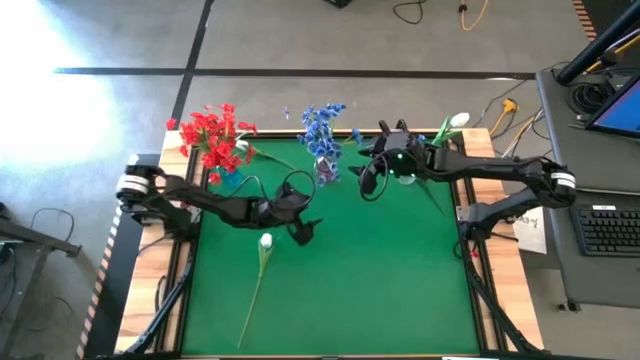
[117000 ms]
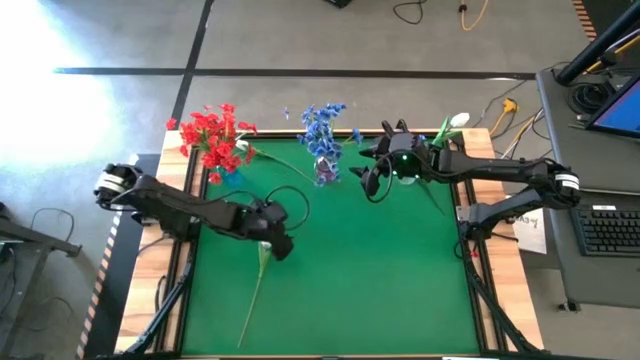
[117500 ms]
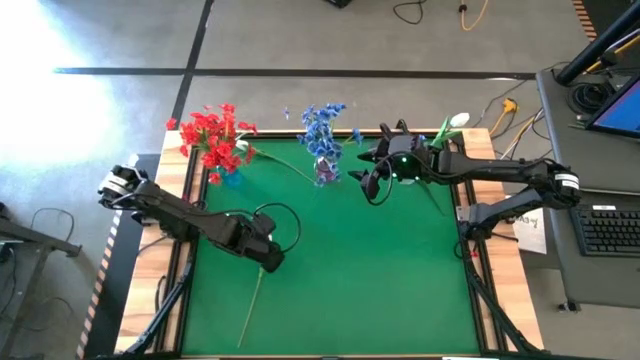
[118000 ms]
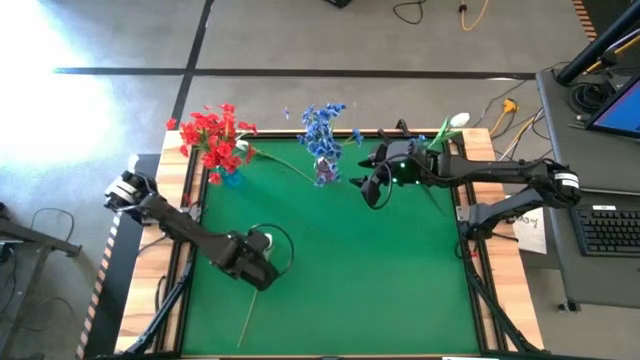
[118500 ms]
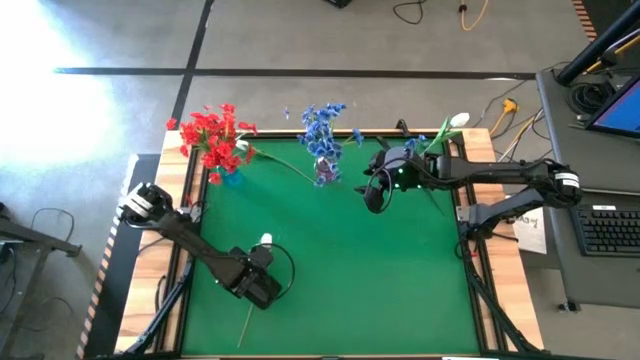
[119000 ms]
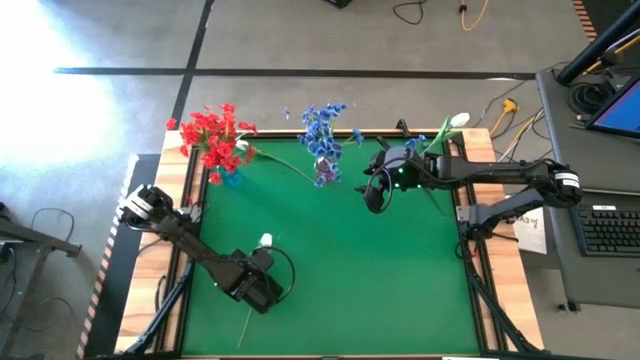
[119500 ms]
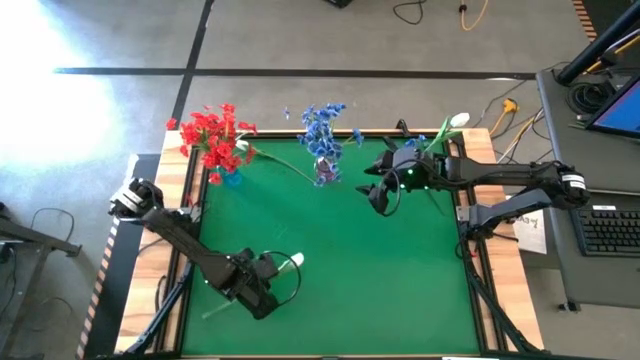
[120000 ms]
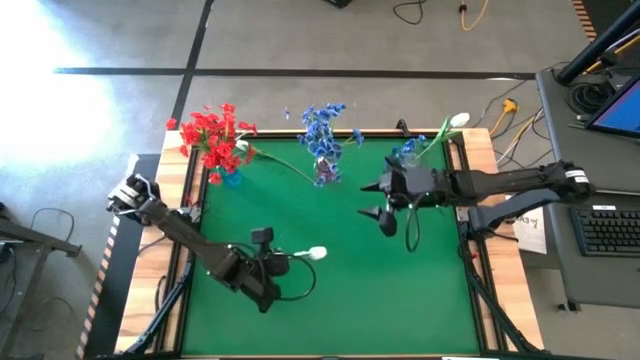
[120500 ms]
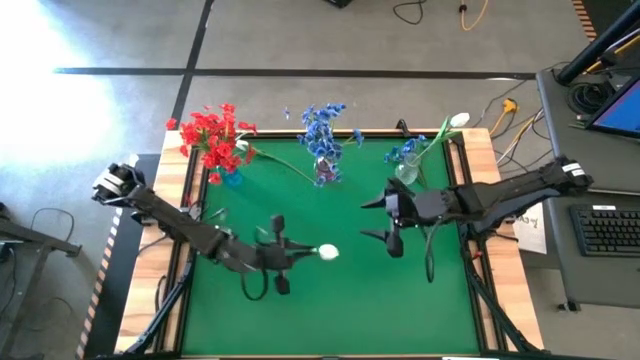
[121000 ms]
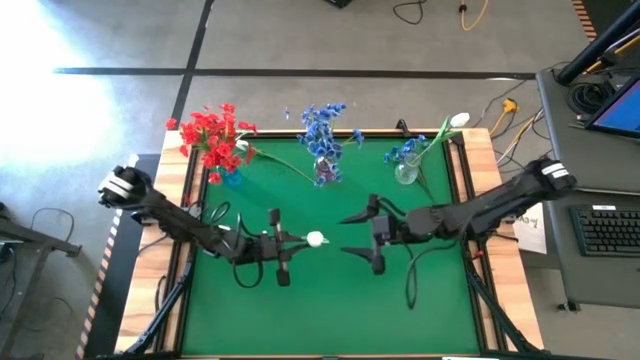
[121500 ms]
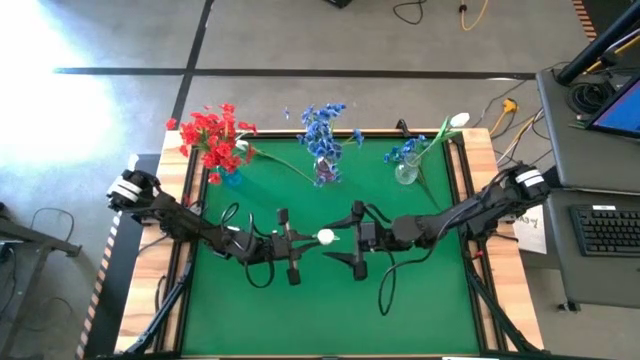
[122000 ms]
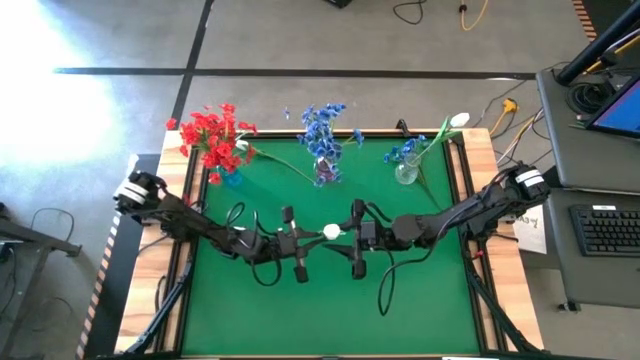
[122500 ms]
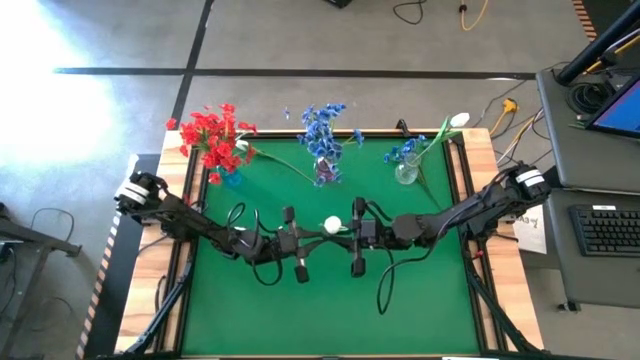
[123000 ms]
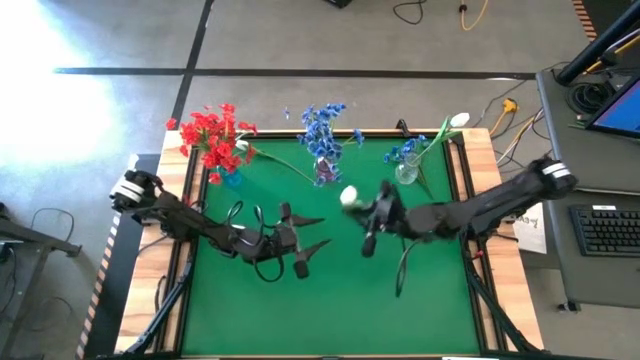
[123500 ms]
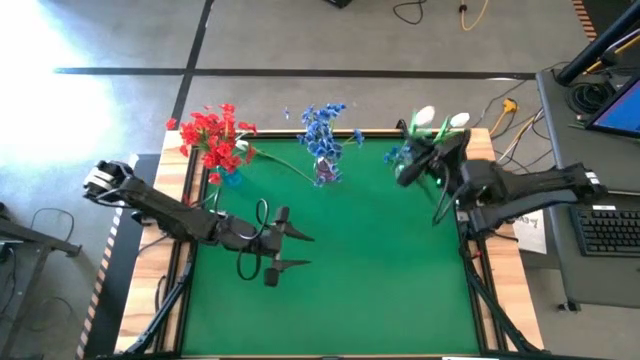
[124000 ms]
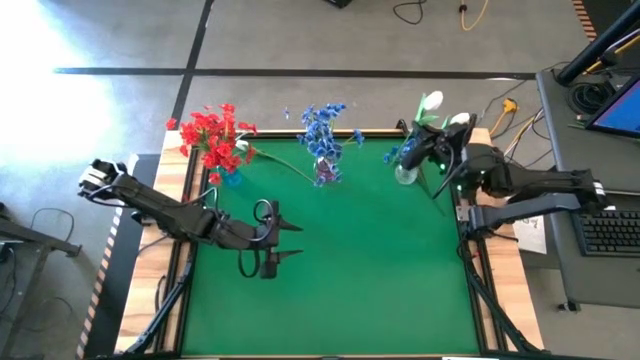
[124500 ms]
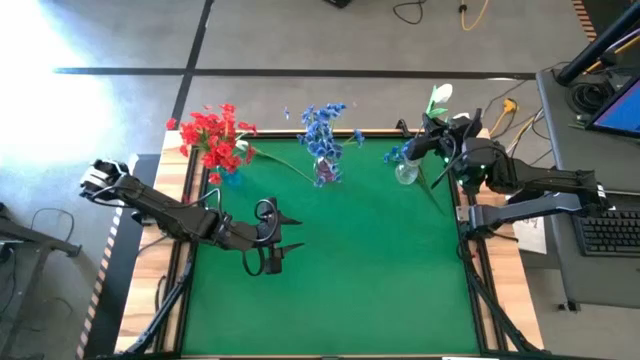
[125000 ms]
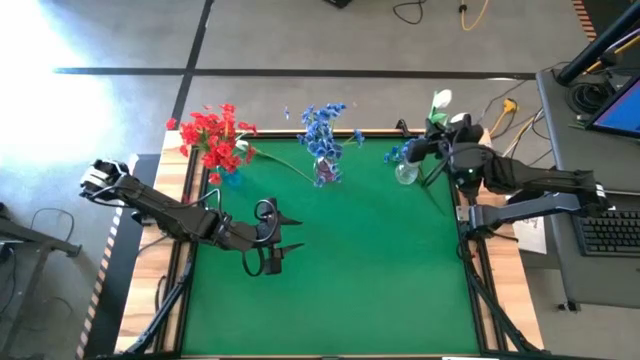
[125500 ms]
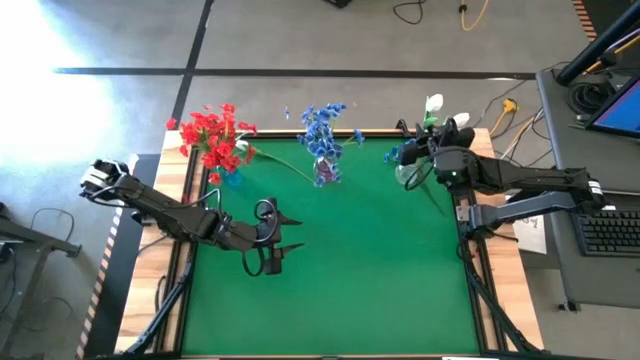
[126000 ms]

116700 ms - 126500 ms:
Task: Sort flowers into vase by color
Put the bottom white flower into the transparent vase

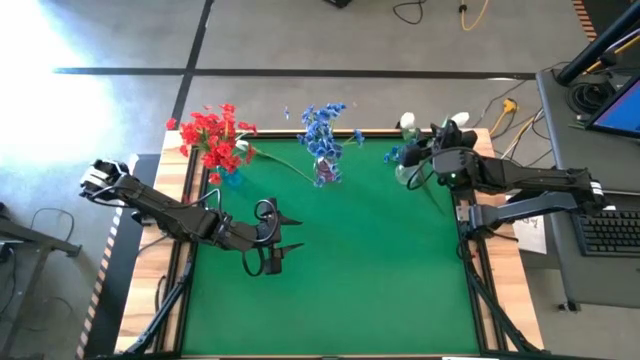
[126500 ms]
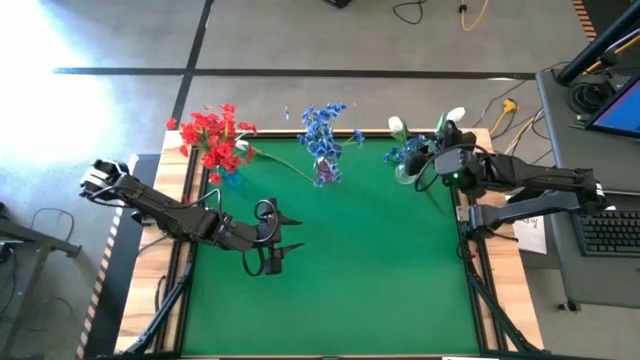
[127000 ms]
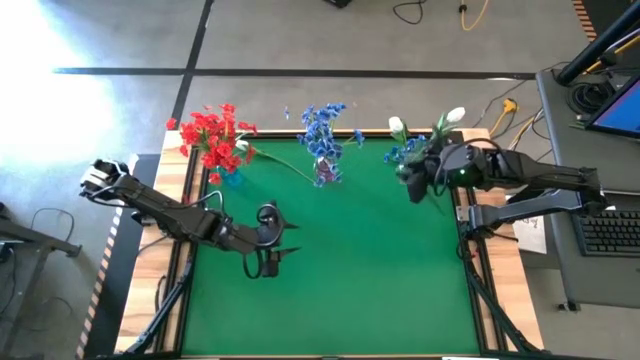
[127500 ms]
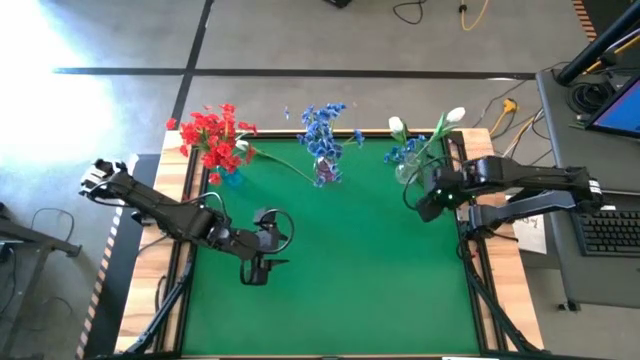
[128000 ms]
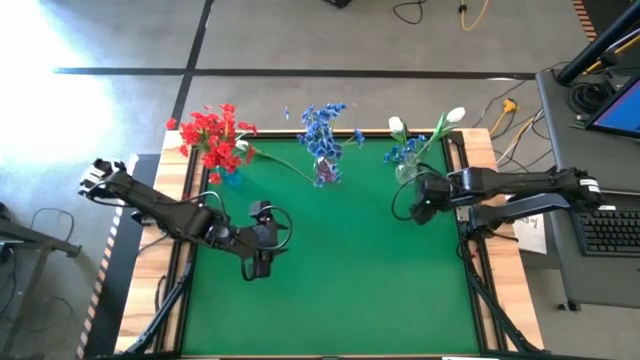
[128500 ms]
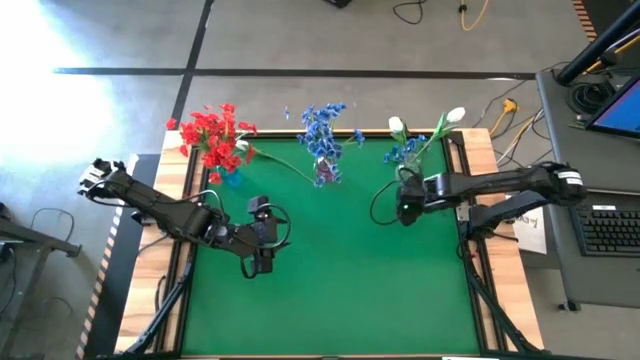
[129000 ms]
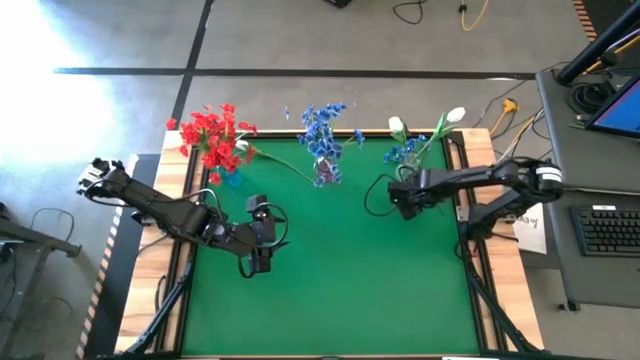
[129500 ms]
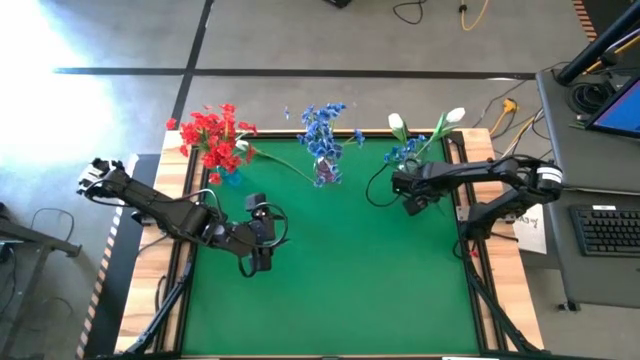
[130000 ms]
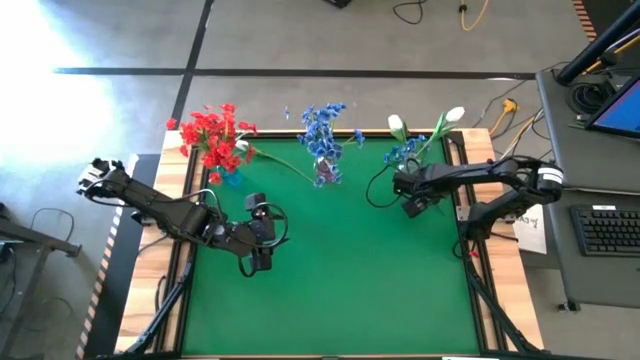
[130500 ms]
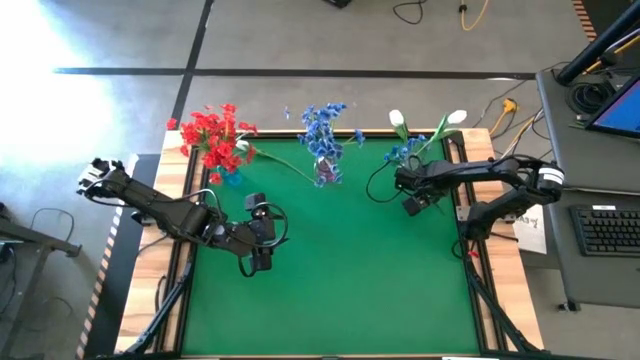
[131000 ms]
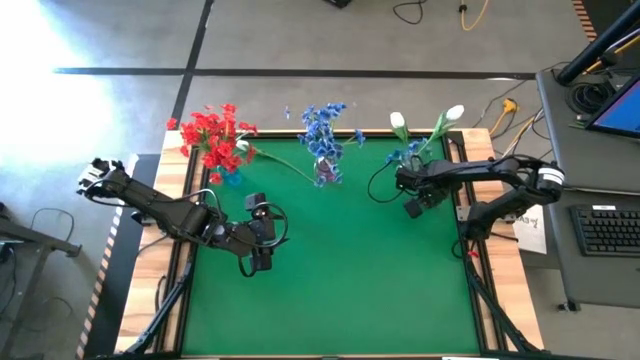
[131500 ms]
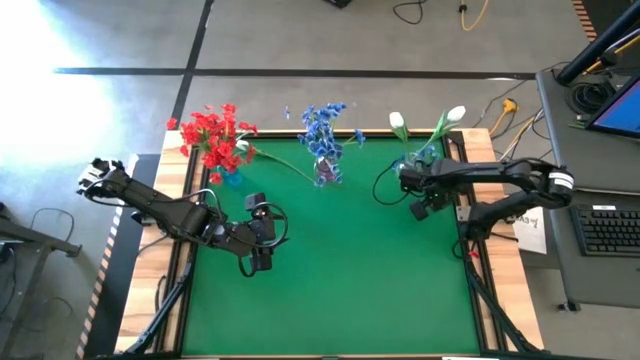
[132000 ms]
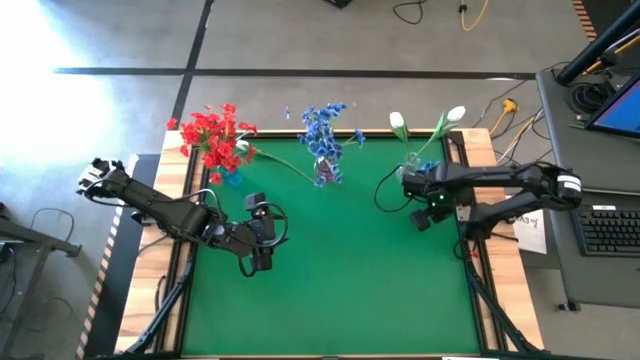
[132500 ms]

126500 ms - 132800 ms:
Put the blue flowers into the purple vase

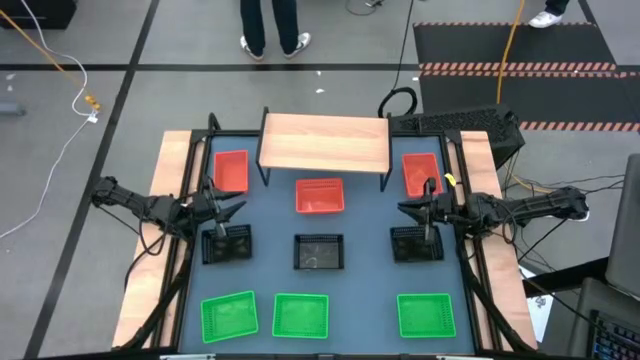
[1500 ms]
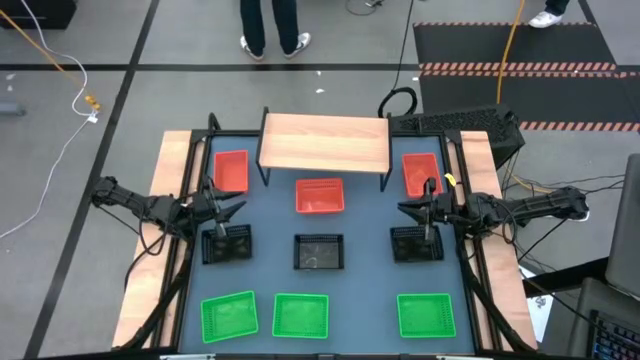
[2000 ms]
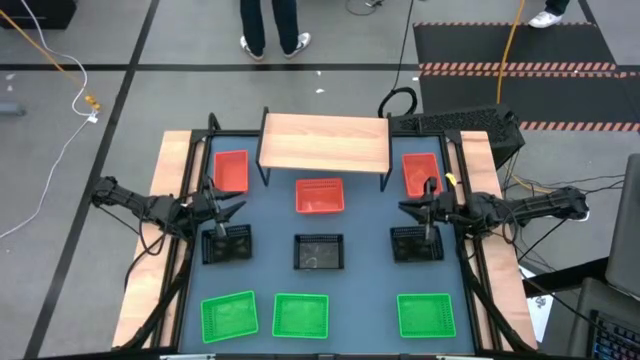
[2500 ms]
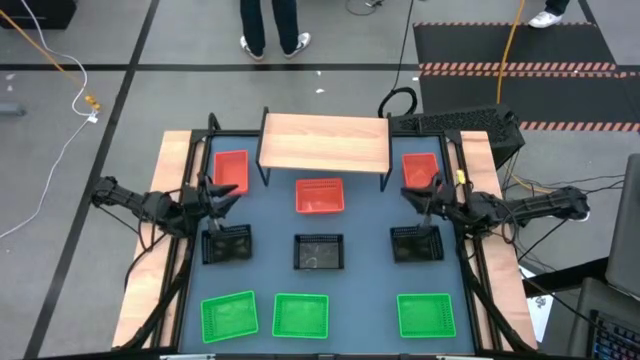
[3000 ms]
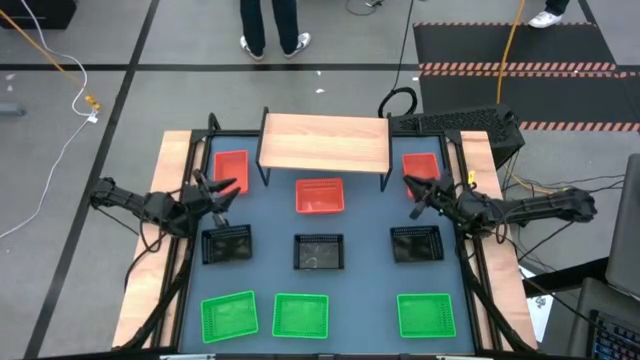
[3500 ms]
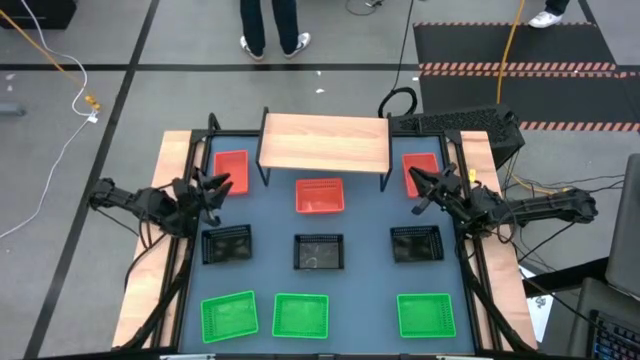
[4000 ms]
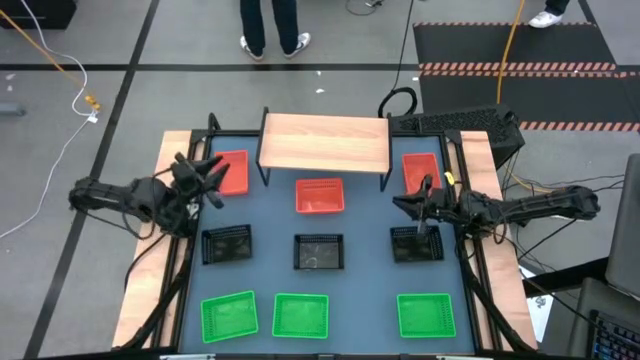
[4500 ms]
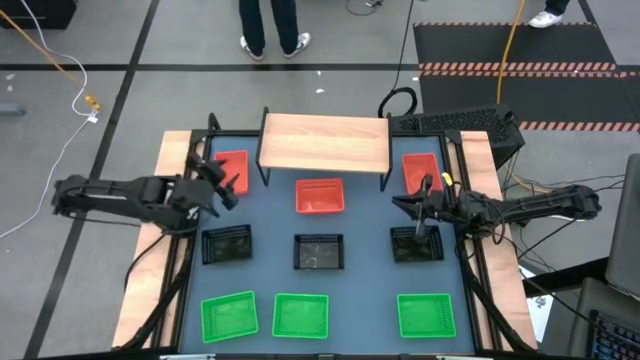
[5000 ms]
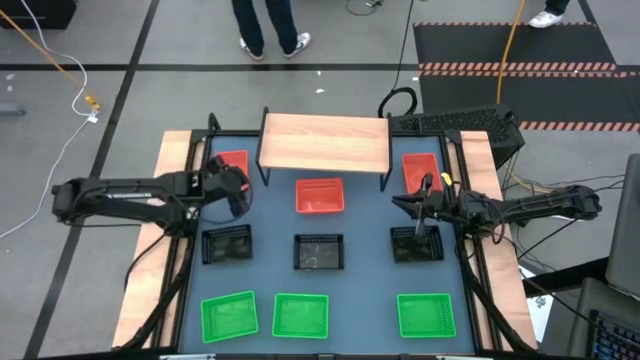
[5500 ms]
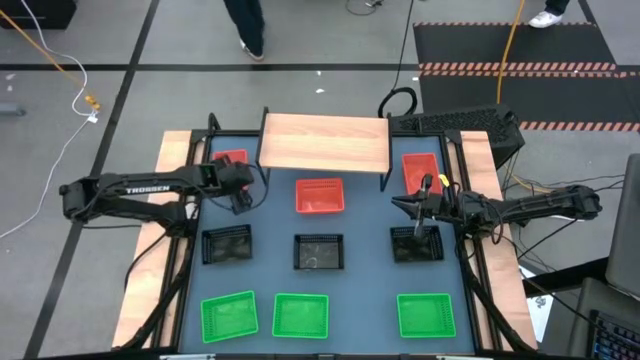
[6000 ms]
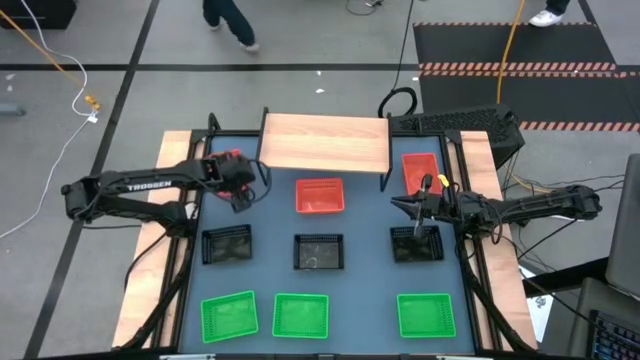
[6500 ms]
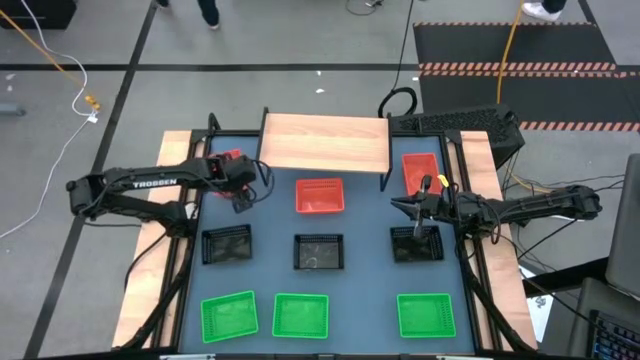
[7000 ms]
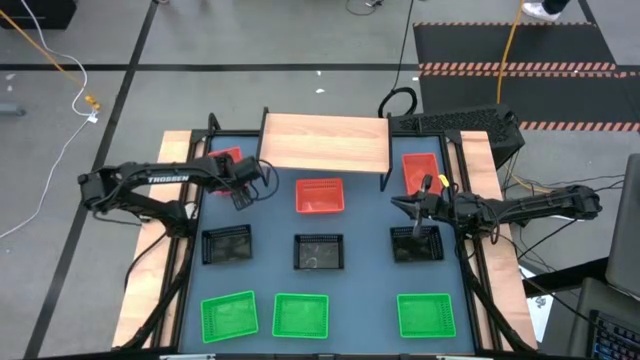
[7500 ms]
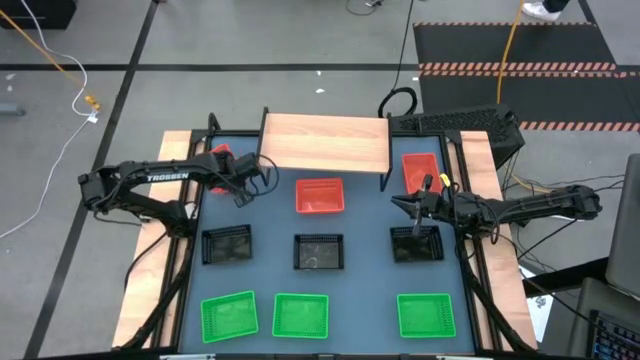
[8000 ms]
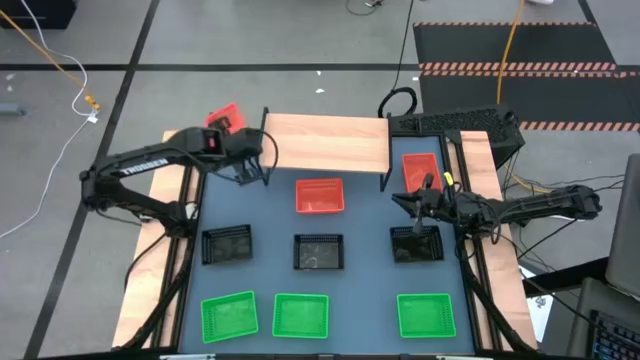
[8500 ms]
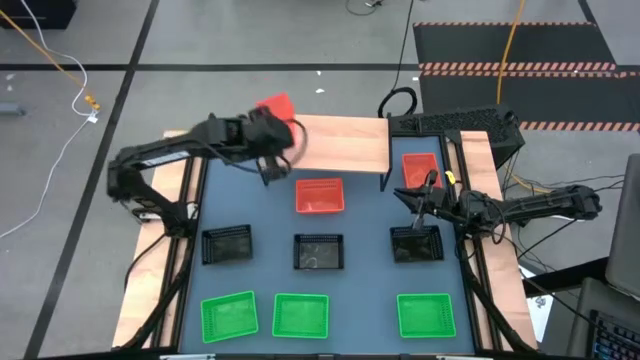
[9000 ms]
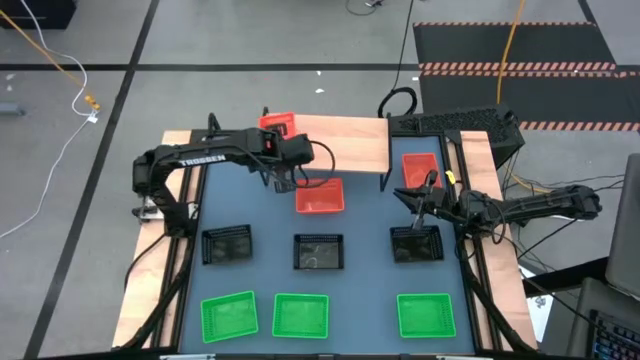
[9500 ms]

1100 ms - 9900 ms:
Task: Stack baskets on shelf by color
Put the left orange bin on the shelf
